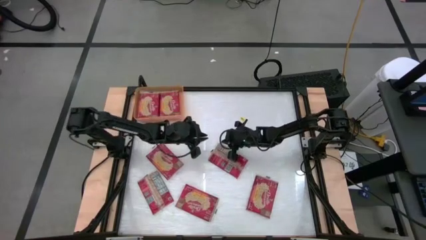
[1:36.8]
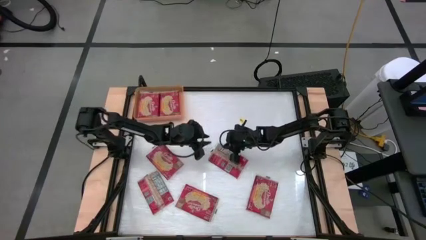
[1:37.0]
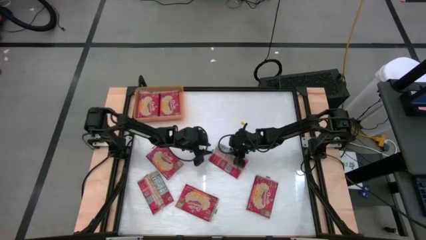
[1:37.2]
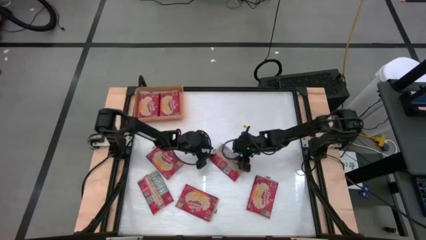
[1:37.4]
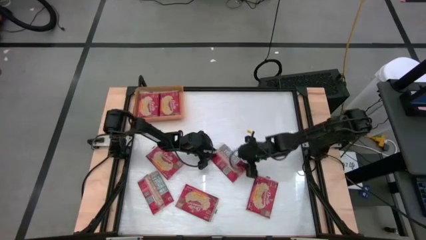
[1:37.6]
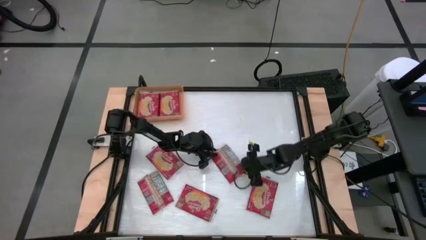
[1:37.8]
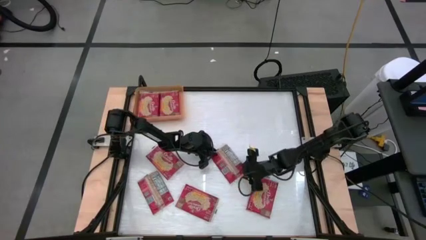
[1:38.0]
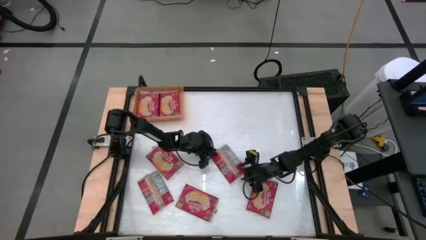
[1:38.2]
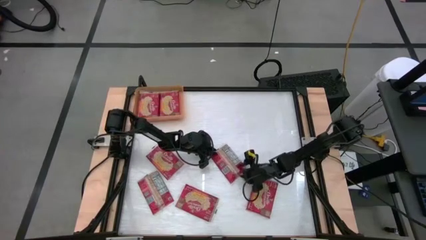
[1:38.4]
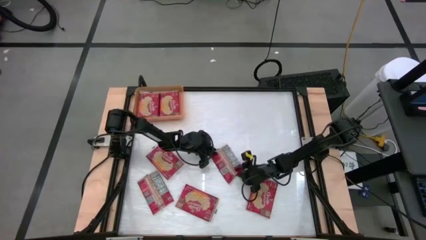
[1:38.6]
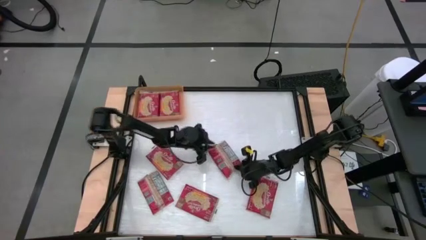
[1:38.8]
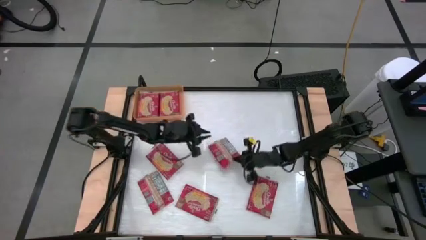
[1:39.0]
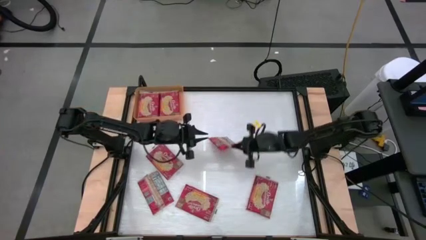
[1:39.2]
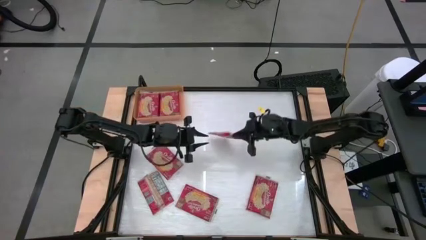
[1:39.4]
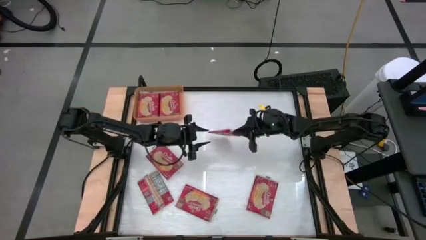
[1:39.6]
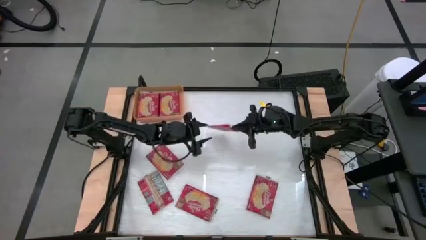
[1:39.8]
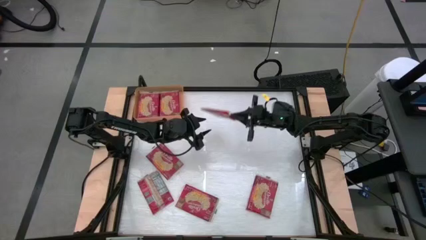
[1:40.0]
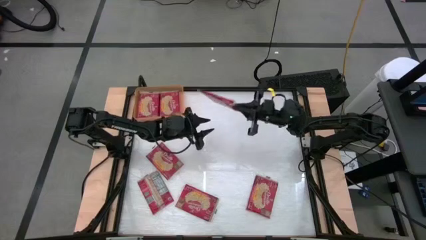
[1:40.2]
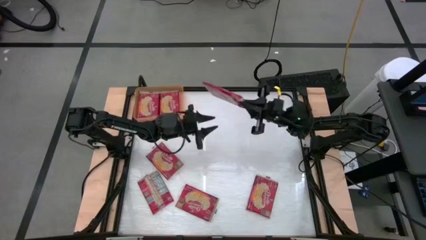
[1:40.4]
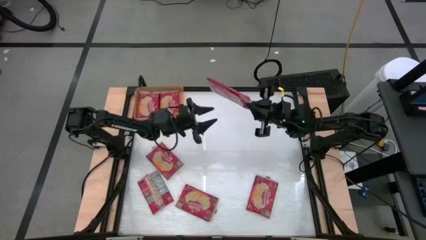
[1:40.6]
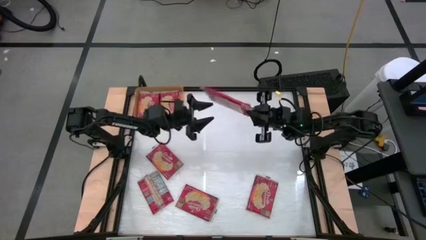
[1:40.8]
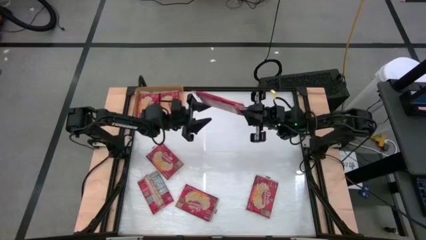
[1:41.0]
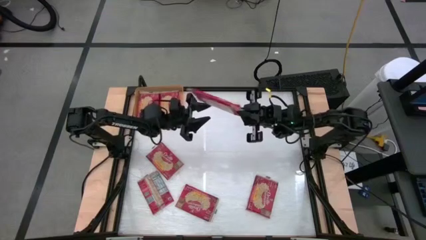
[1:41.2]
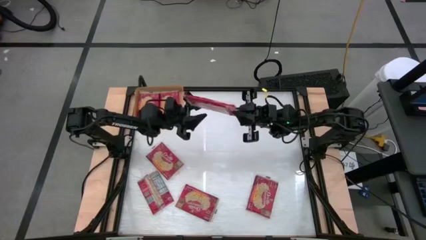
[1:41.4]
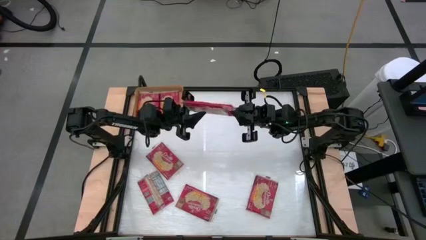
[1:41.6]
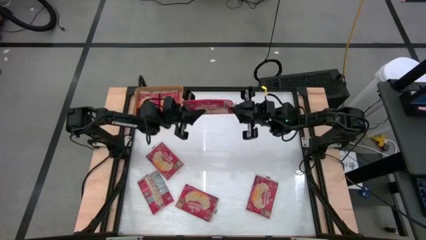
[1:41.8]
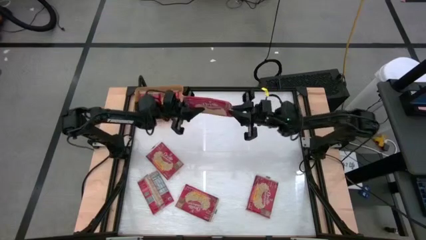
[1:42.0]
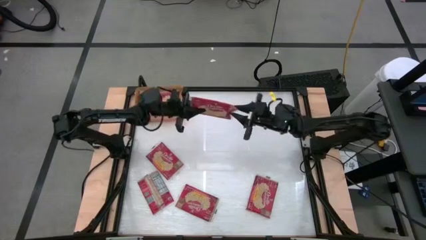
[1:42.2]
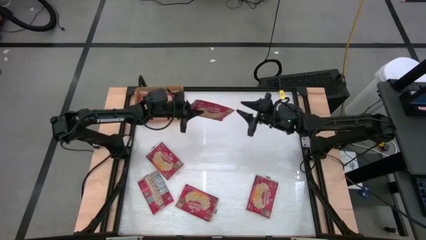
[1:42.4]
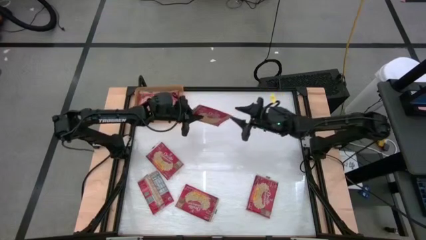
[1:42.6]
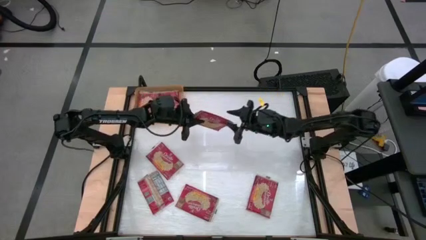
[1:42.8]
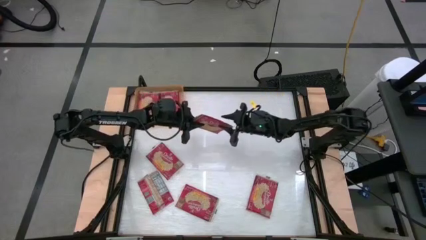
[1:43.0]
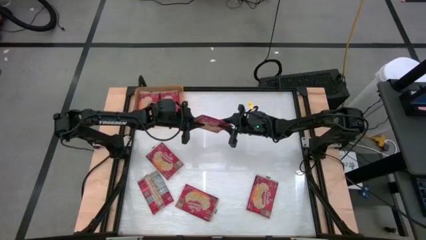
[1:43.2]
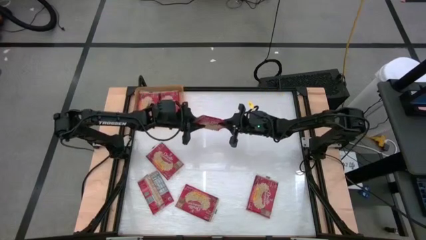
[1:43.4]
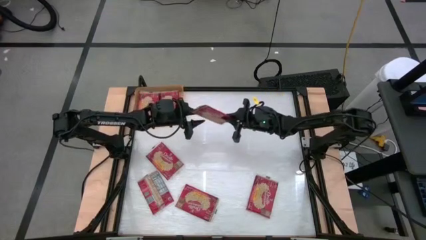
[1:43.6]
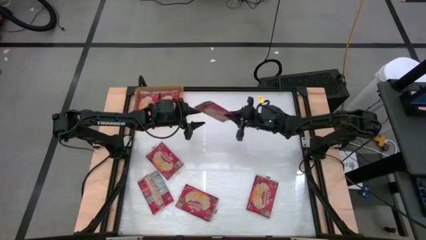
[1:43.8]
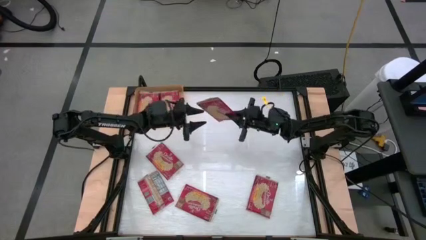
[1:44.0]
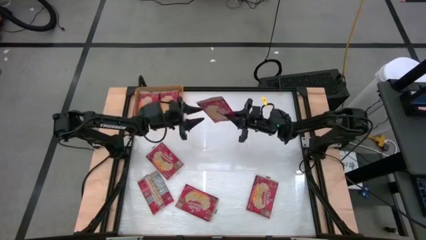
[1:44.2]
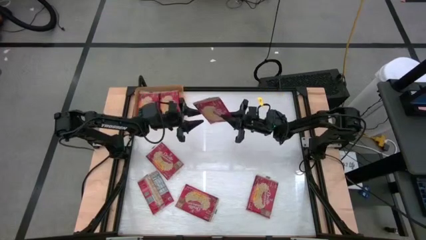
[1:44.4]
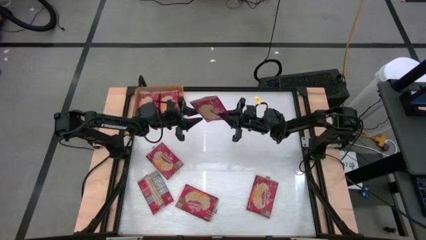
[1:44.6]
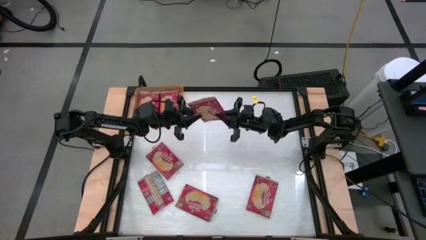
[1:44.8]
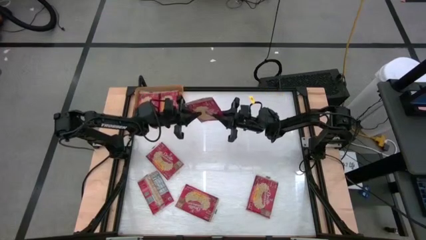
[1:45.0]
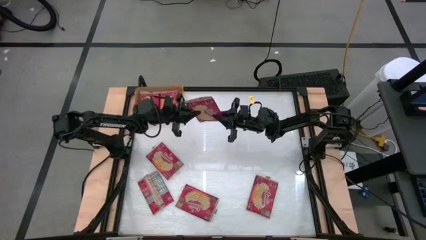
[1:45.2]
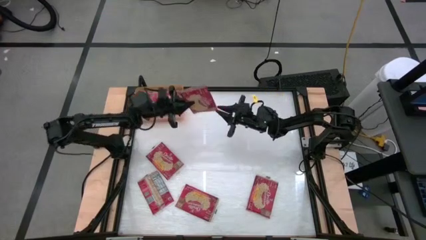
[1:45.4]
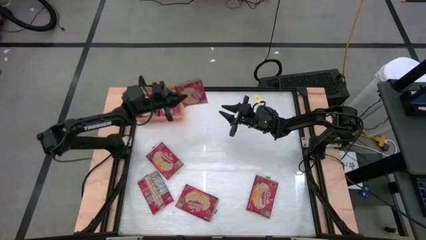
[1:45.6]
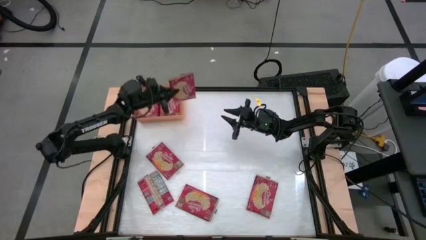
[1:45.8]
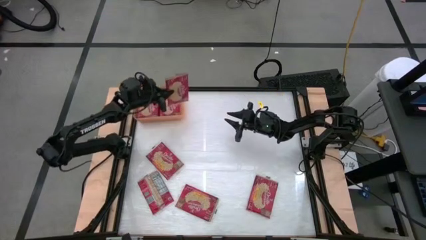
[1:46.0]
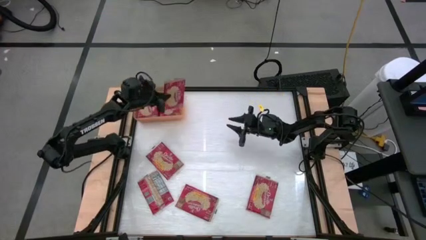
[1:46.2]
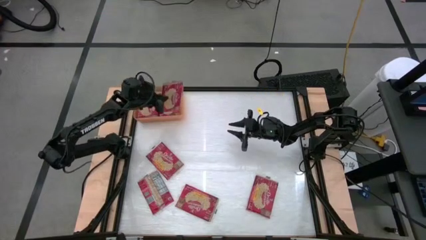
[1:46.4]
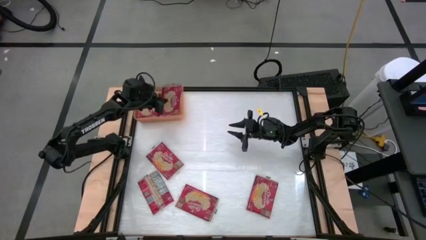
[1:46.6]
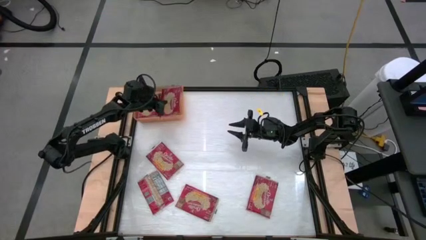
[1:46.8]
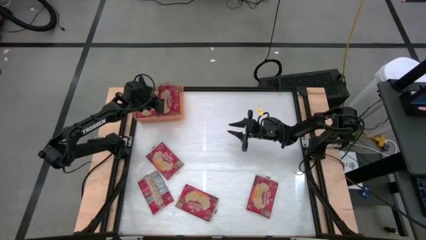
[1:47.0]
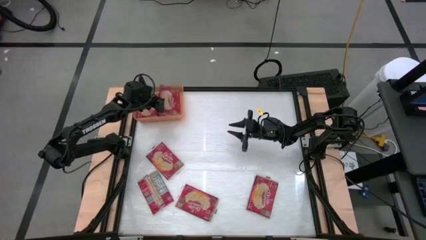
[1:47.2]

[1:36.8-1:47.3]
Task: Sort popcorn bags into baskets
Put the red popcorn bag into the orange bin

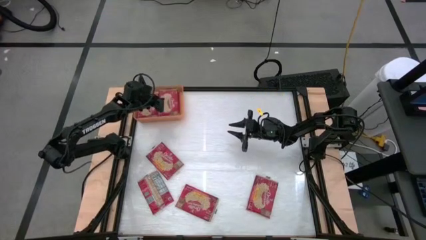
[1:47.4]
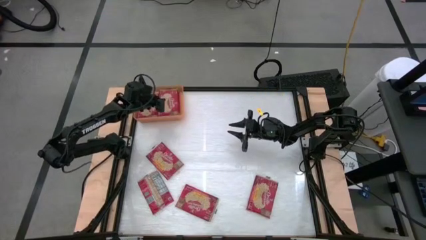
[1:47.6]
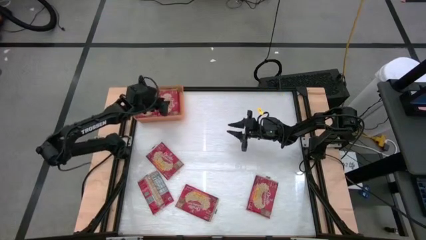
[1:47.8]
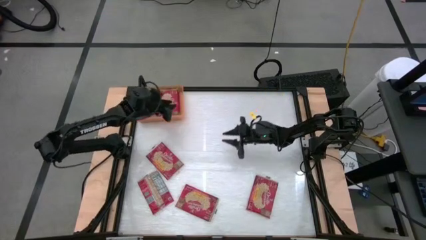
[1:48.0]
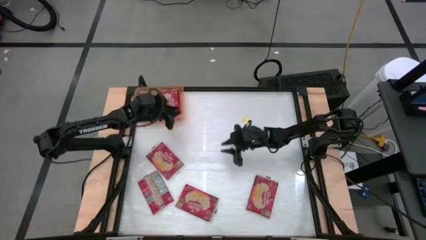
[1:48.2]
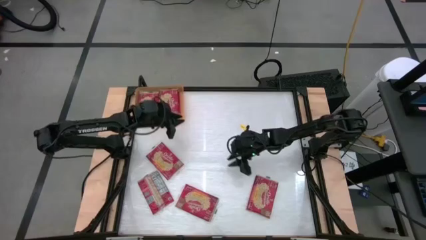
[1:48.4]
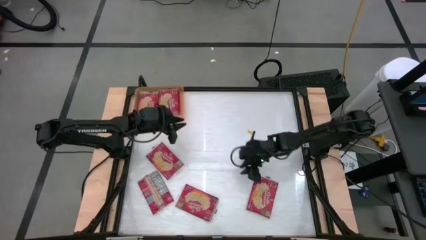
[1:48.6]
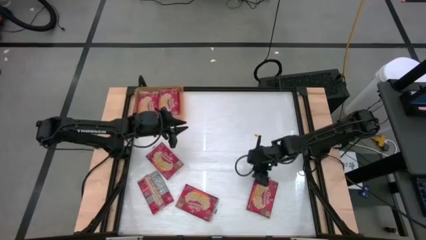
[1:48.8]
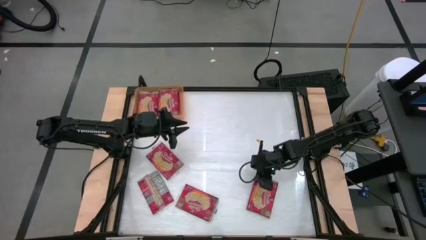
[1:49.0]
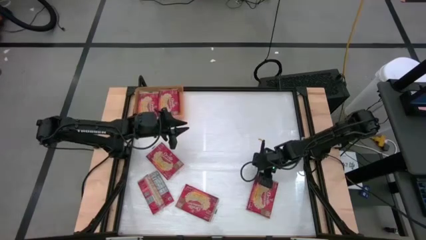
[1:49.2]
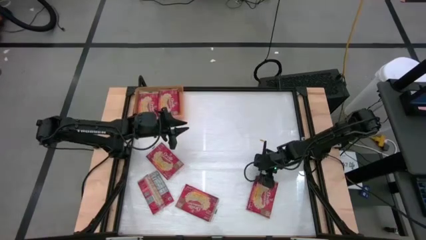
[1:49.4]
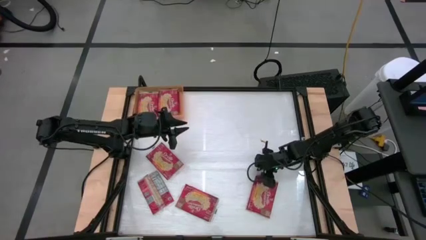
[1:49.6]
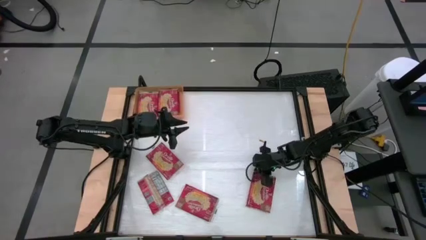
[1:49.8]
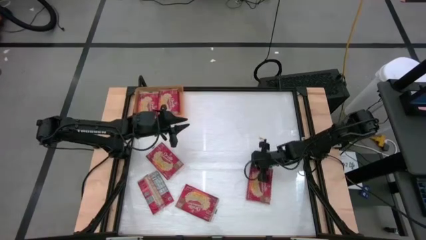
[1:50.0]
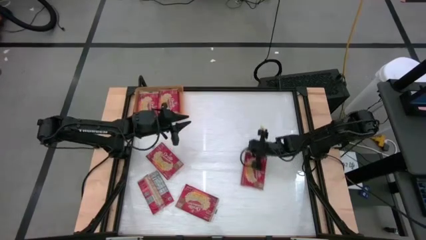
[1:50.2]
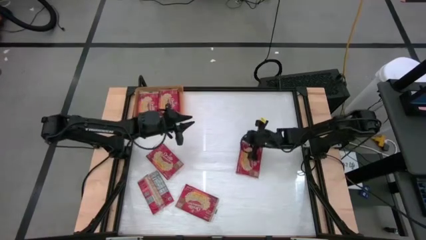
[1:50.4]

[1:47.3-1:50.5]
Put the red popcorn bag into the orange bin

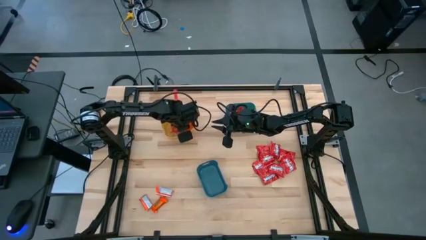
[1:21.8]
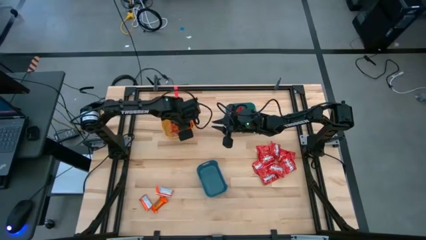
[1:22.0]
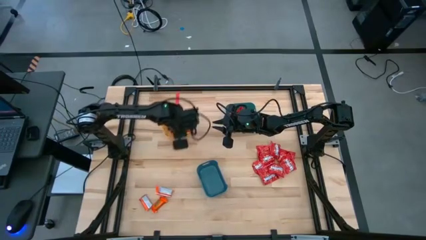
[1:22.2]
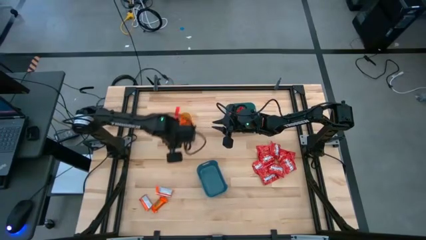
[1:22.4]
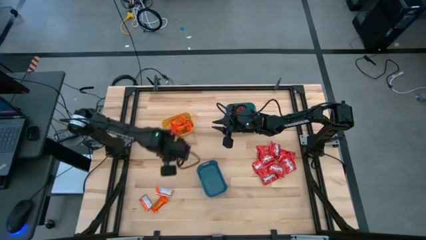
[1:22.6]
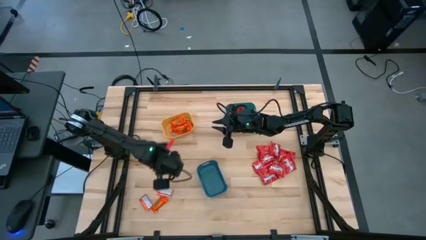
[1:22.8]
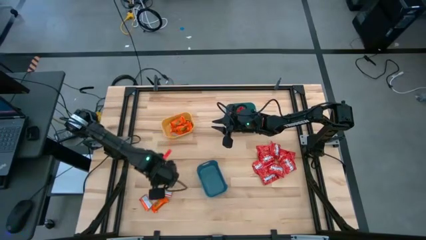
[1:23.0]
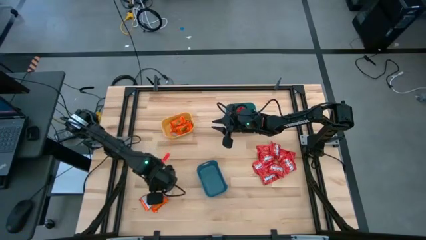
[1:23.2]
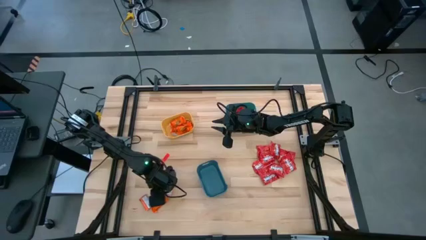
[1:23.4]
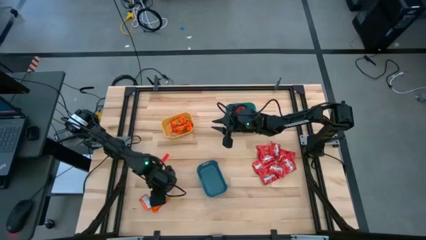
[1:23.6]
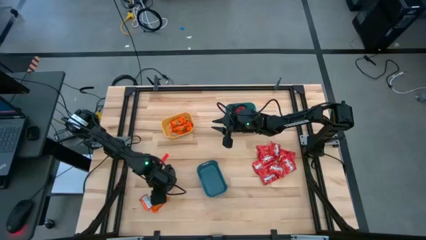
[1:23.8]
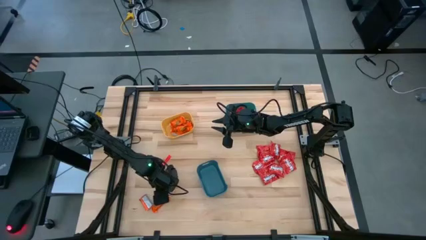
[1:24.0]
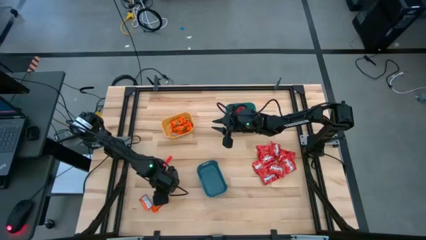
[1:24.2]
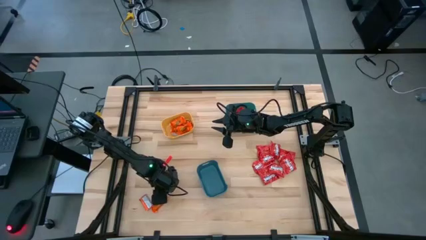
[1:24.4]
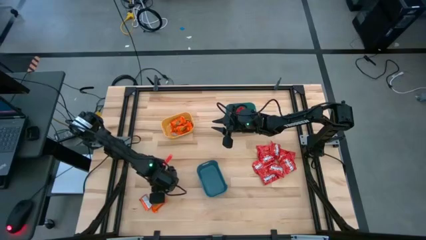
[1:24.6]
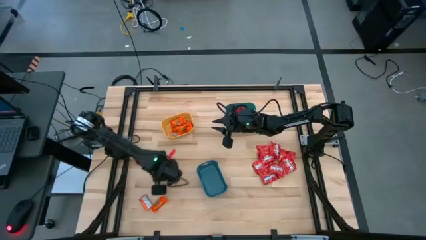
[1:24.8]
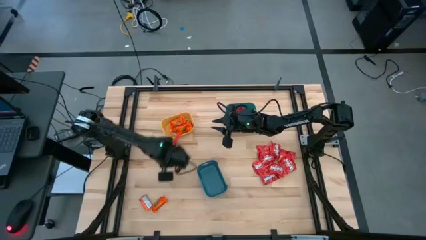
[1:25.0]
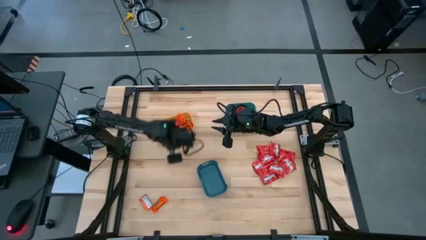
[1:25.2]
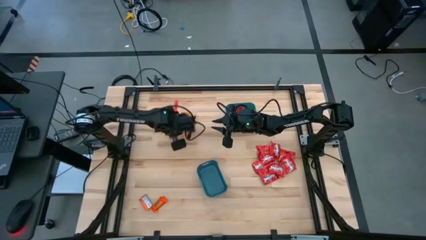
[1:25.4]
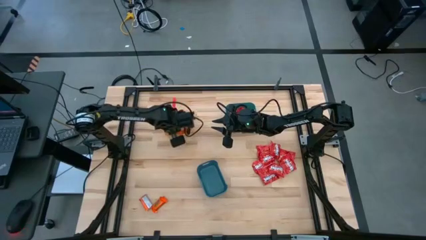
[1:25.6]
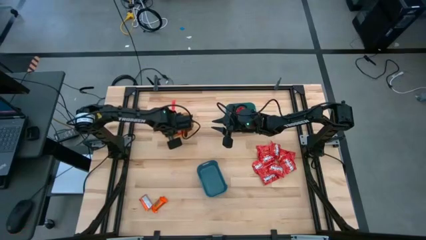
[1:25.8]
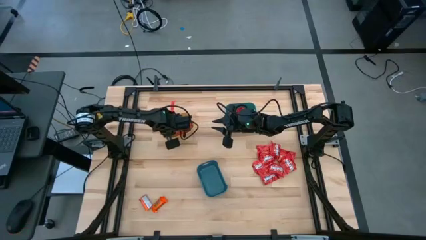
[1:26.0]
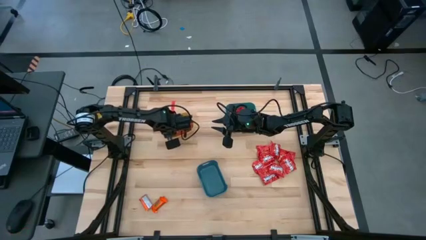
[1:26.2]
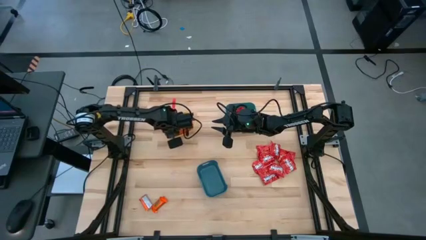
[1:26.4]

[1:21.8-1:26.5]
Task: Sort candy
Put the orange chocolate bar into the yellow bin
